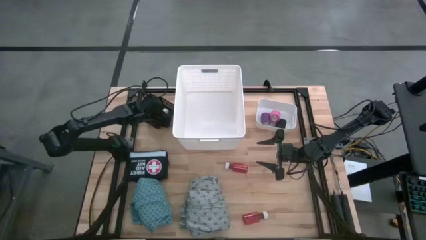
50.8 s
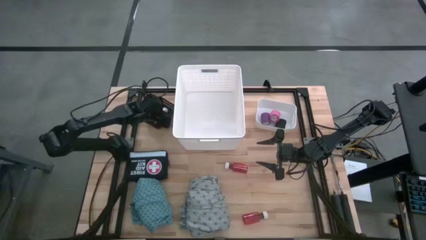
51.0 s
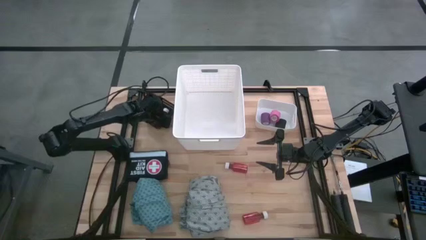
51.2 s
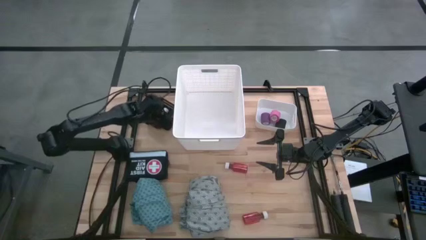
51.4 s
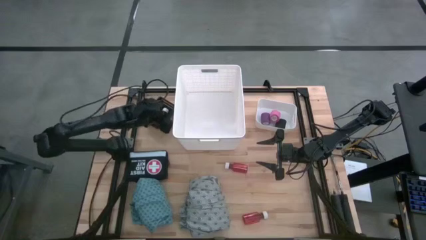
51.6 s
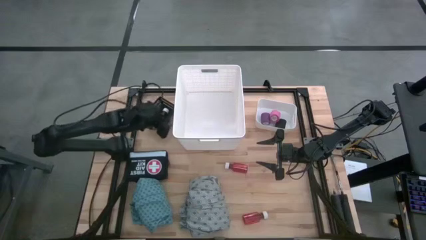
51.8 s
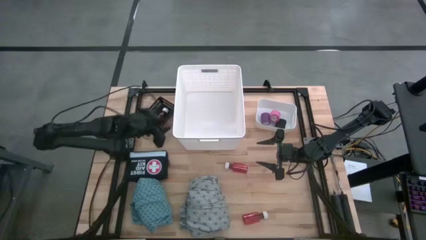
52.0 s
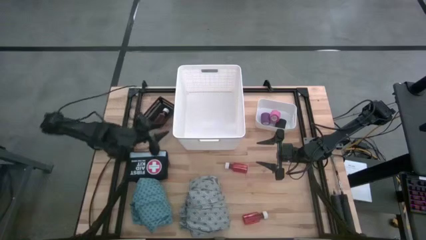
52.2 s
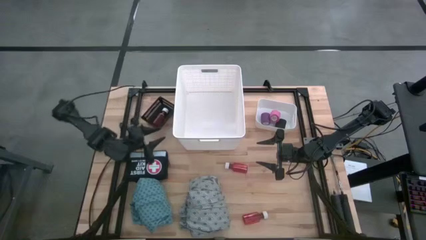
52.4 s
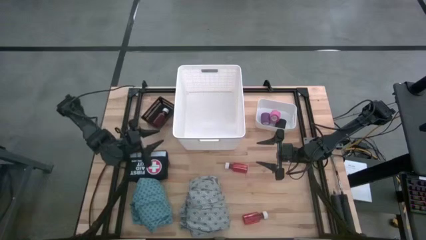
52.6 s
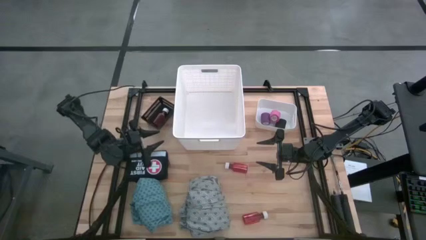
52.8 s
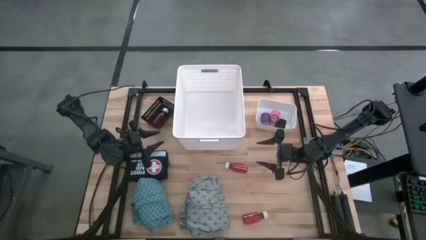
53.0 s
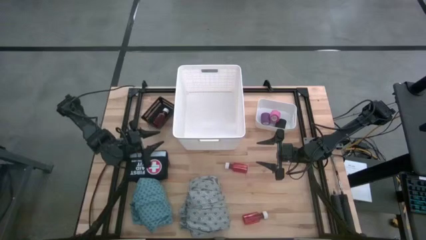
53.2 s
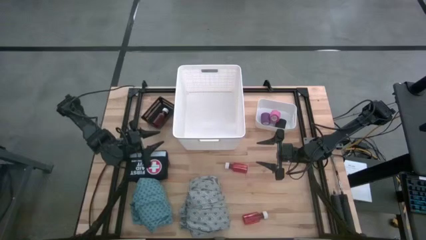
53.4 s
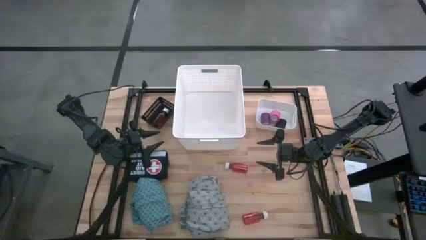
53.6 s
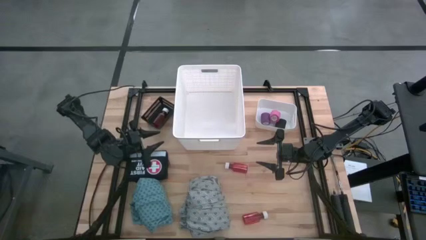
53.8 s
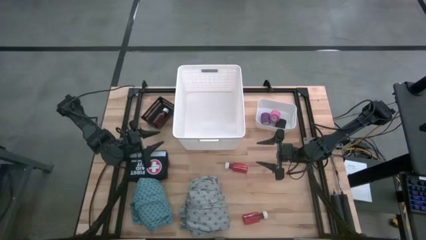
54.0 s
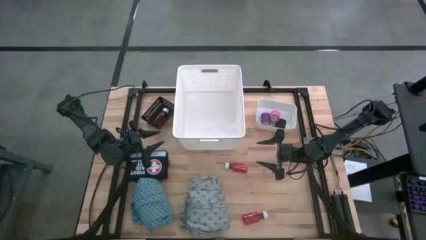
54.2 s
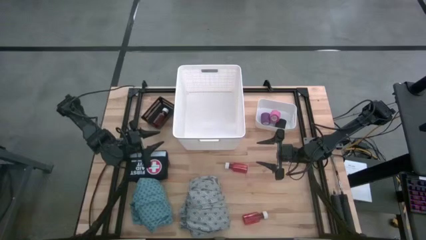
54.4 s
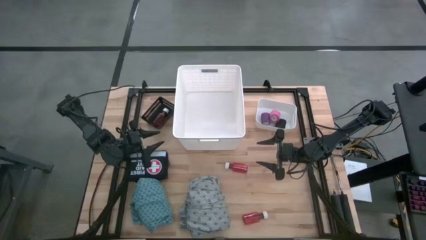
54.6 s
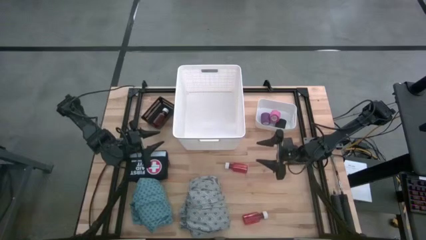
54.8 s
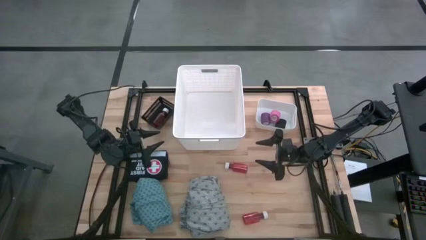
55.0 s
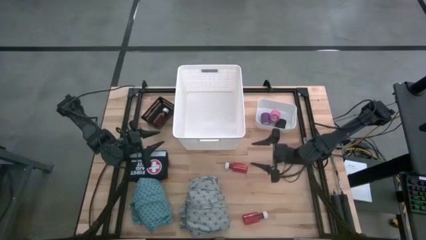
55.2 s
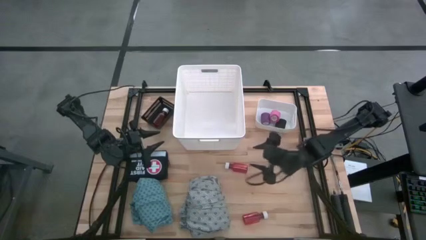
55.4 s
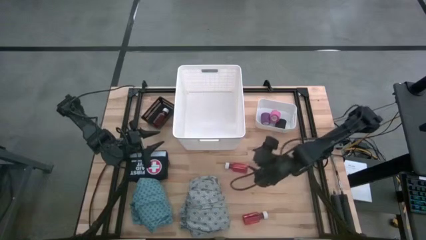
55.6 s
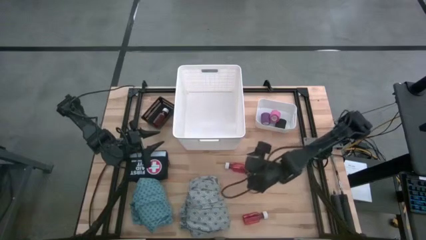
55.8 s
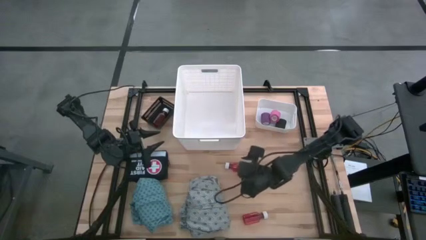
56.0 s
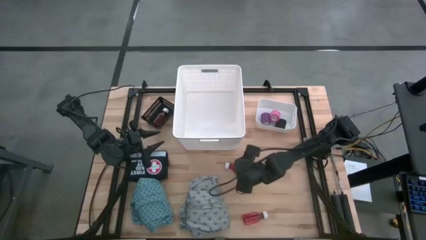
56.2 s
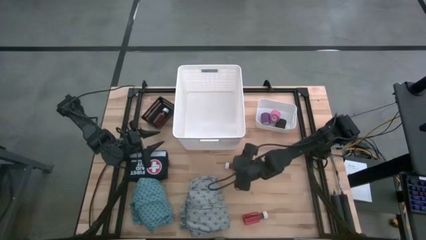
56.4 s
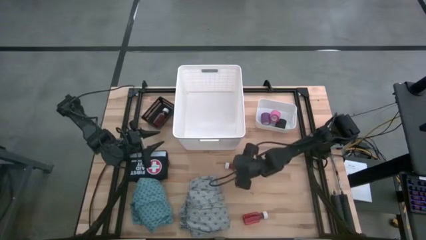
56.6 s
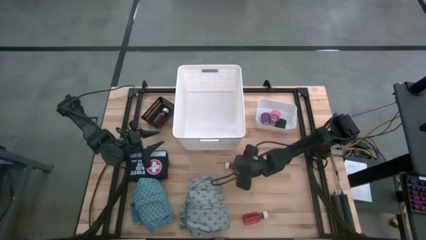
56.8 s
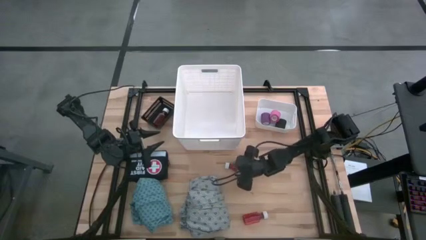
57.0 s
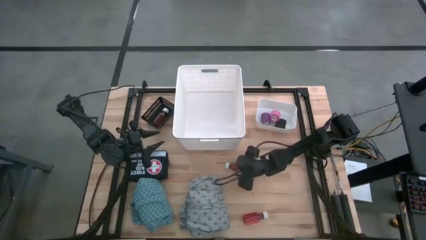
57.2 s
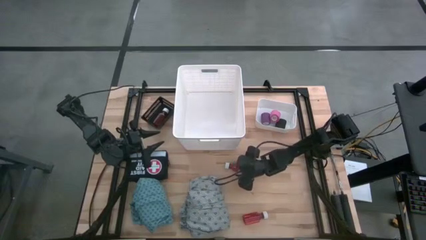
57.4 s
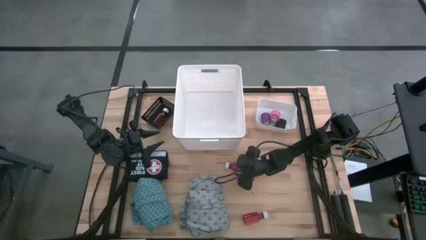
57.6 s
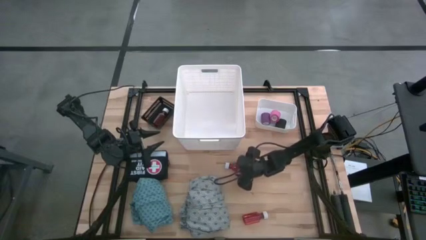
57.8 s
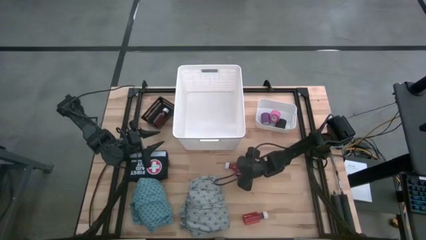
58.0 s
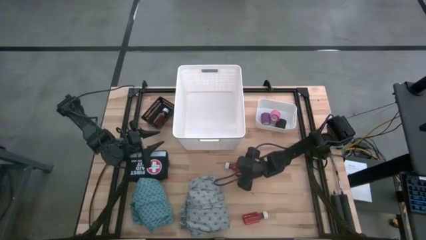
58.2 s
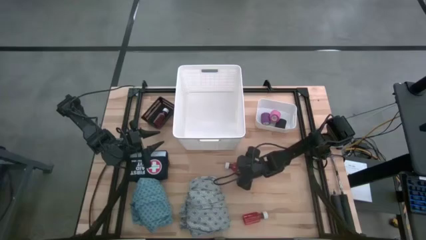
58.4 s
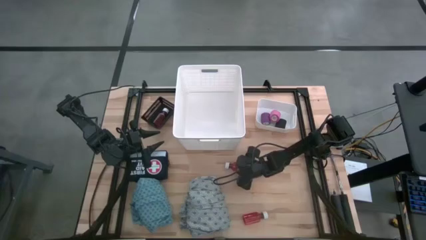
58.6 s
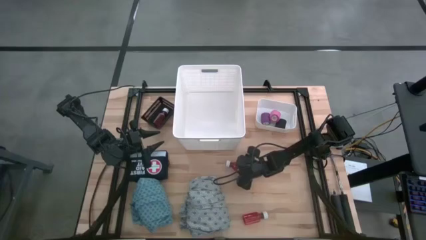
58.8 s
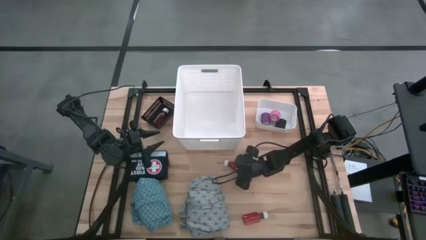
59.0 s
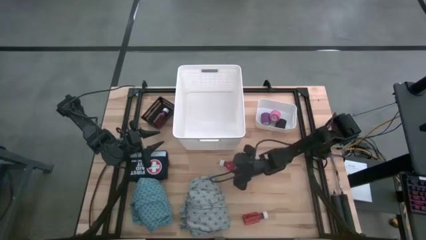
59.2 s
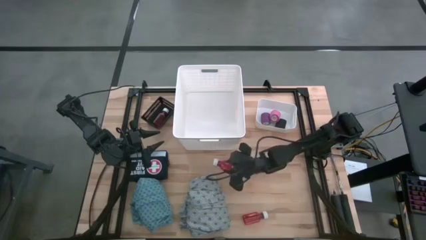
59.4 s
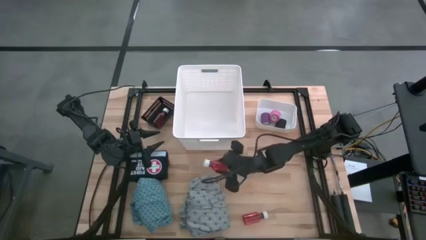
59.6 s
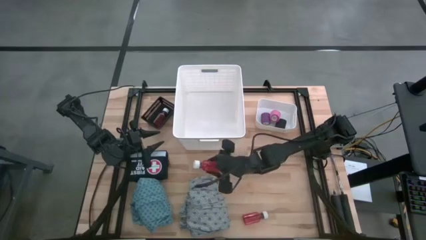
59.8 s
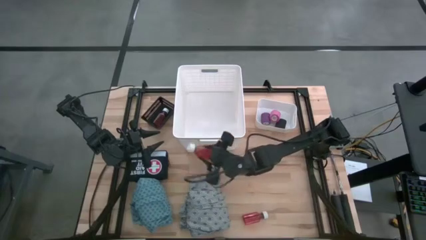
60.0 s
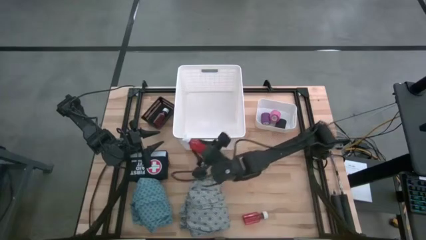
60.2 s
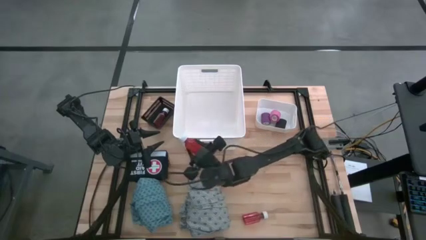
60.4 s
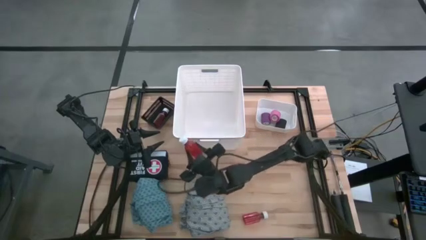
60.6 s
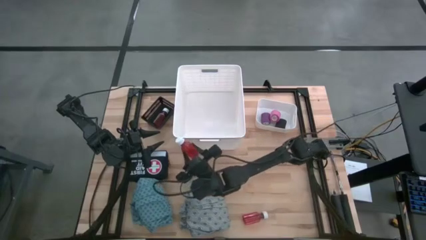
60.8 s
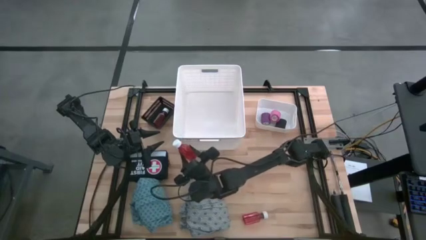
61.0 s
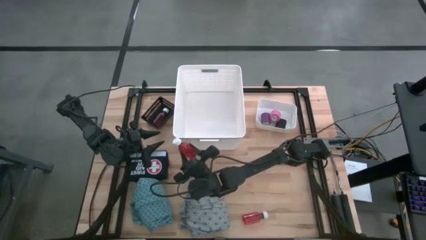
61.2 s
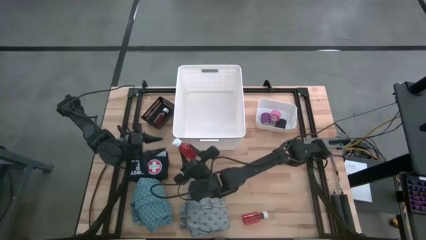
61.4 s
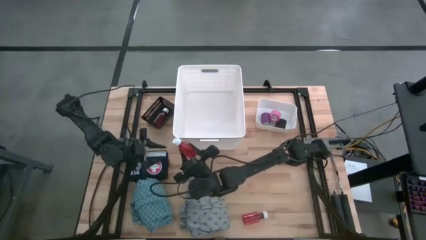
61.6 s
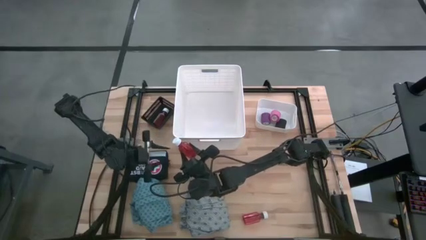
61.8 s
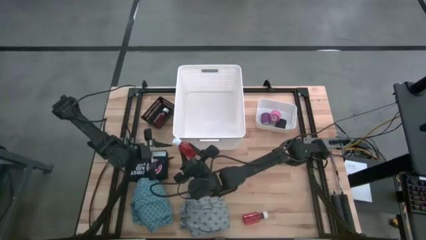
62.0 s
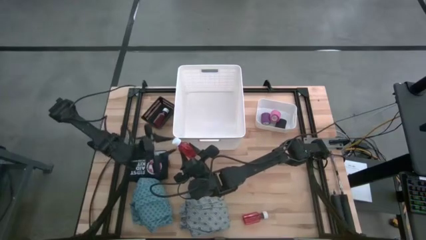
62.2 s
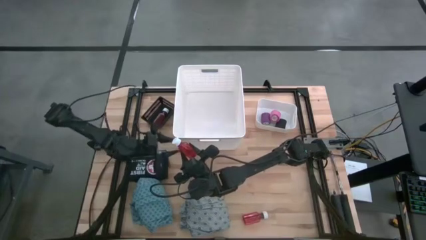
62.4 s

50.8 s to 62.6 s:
Task: Pick & Place Medicine items
Put the top red medicine bottle into the black bin
